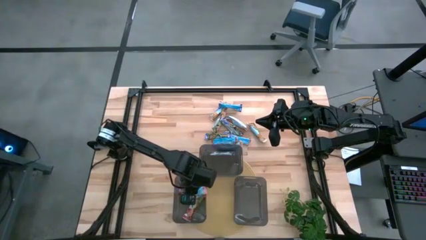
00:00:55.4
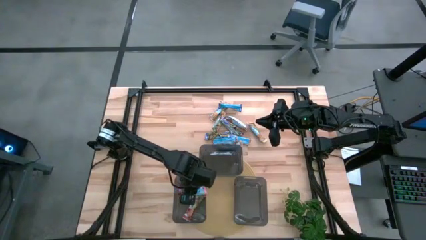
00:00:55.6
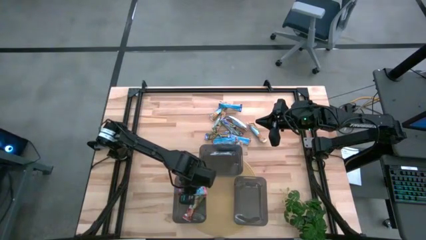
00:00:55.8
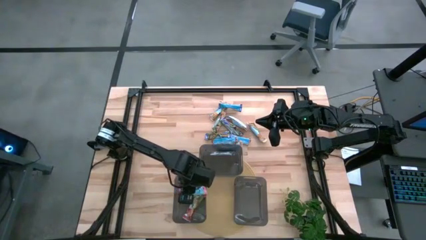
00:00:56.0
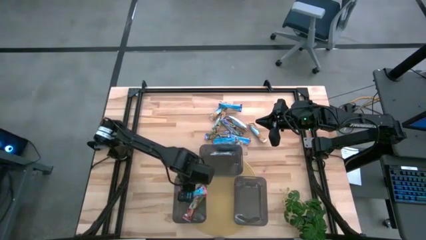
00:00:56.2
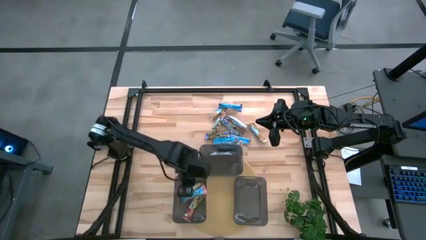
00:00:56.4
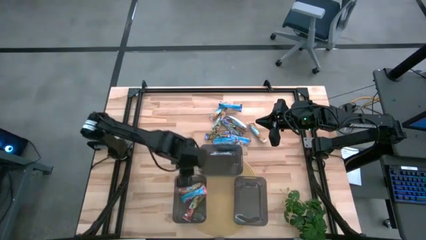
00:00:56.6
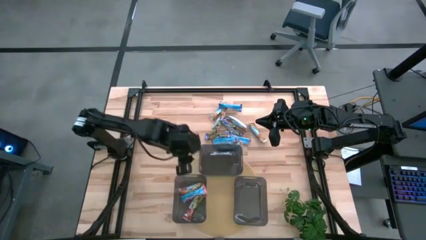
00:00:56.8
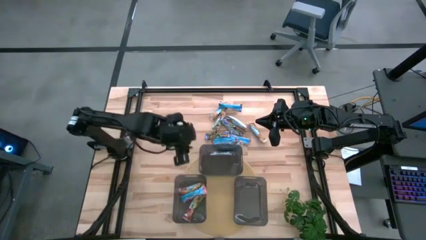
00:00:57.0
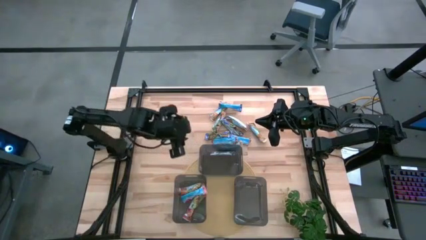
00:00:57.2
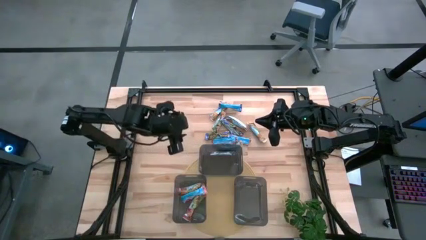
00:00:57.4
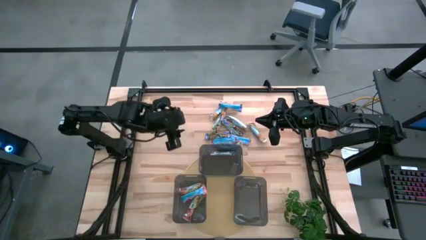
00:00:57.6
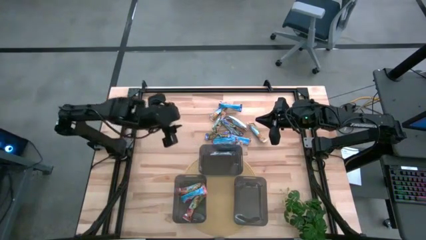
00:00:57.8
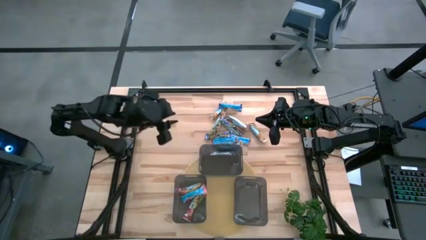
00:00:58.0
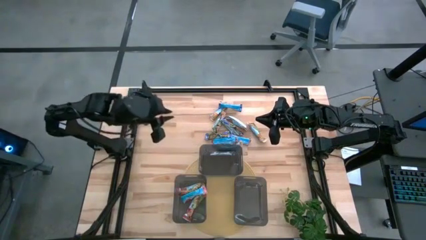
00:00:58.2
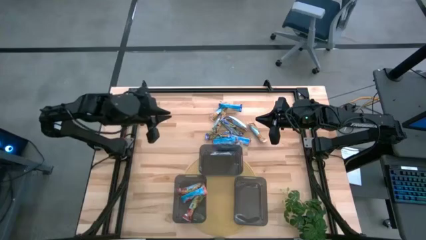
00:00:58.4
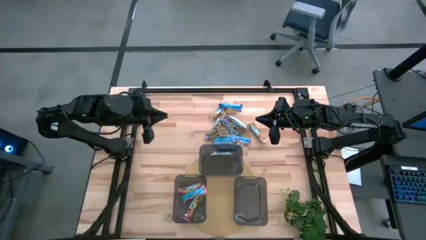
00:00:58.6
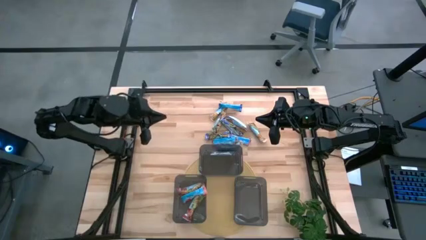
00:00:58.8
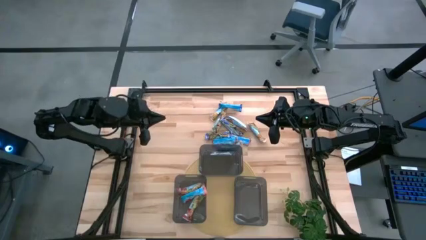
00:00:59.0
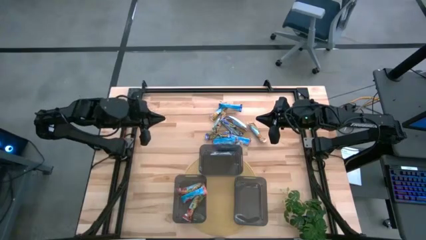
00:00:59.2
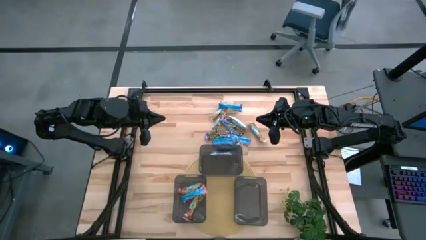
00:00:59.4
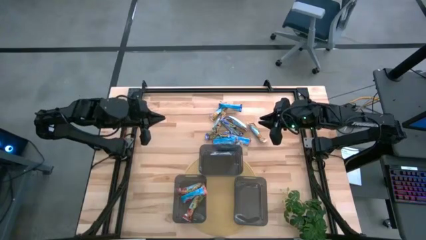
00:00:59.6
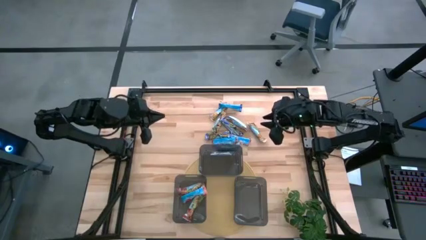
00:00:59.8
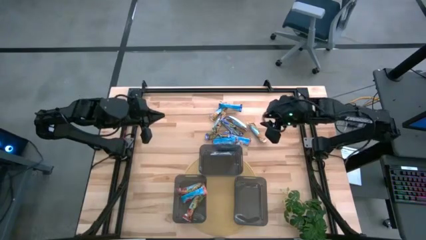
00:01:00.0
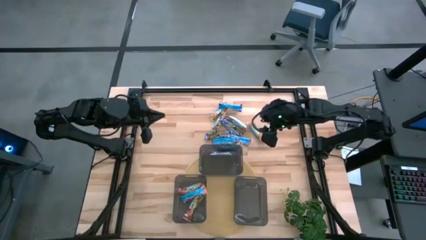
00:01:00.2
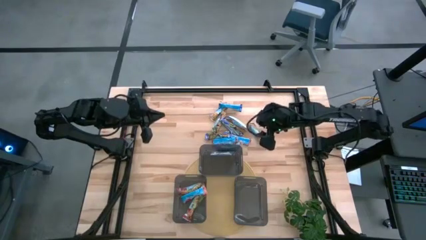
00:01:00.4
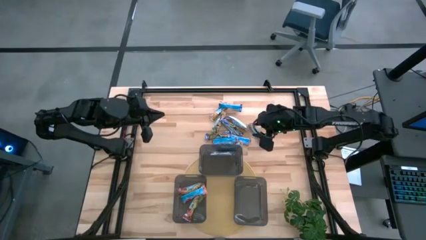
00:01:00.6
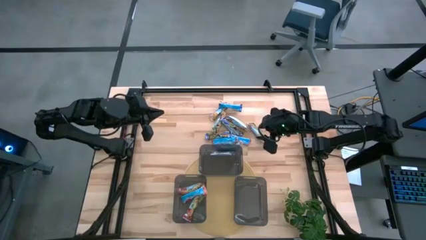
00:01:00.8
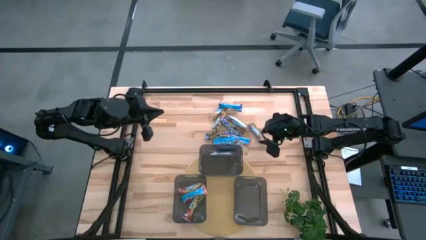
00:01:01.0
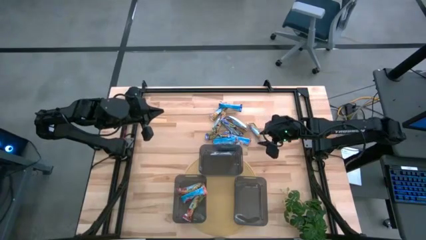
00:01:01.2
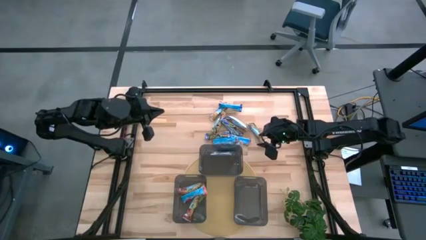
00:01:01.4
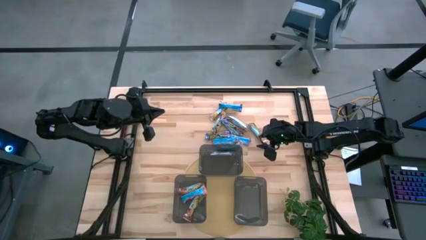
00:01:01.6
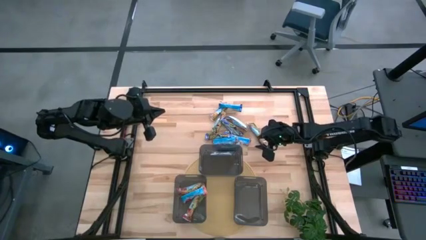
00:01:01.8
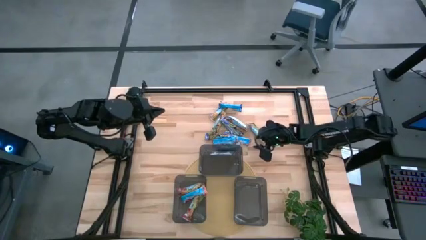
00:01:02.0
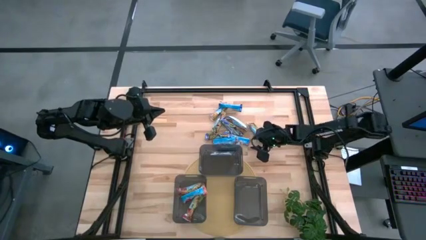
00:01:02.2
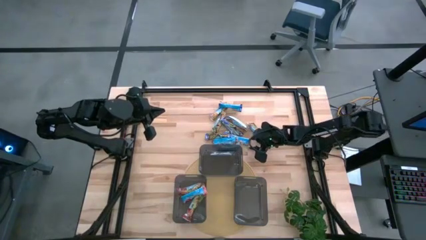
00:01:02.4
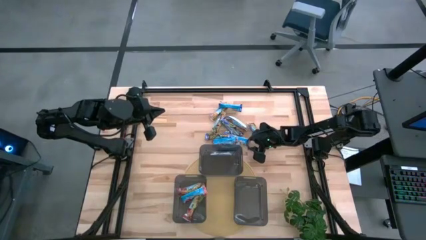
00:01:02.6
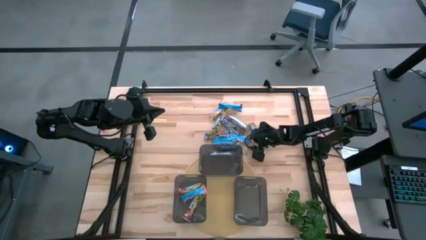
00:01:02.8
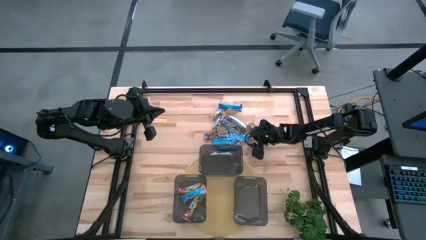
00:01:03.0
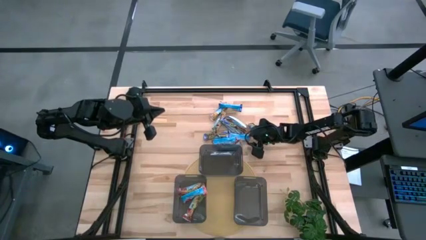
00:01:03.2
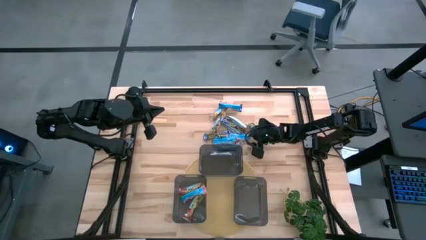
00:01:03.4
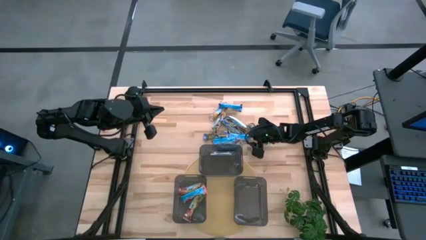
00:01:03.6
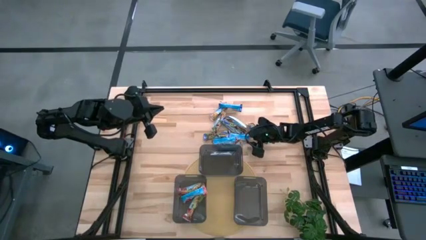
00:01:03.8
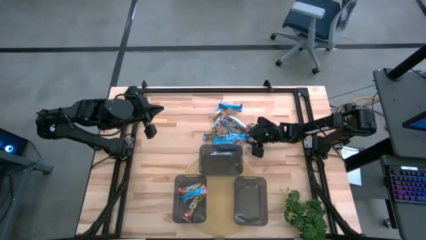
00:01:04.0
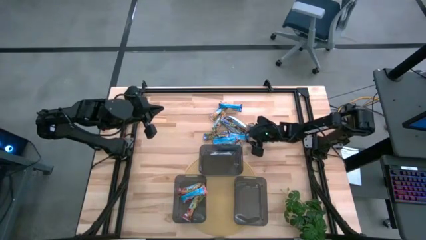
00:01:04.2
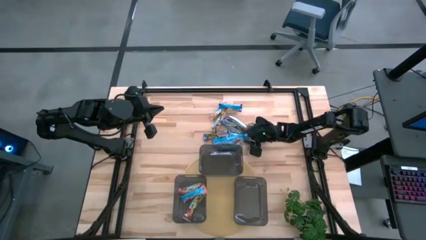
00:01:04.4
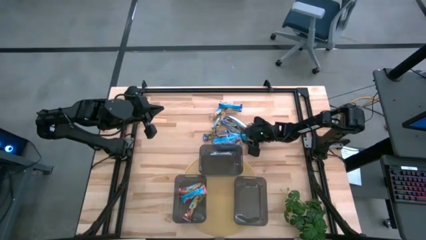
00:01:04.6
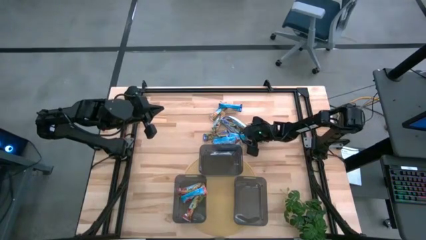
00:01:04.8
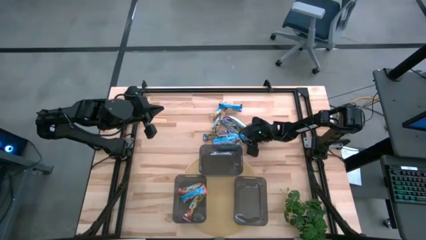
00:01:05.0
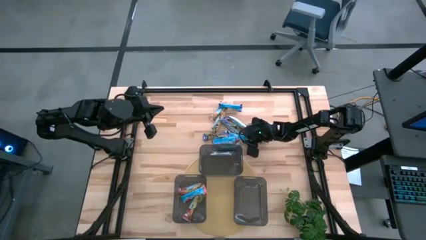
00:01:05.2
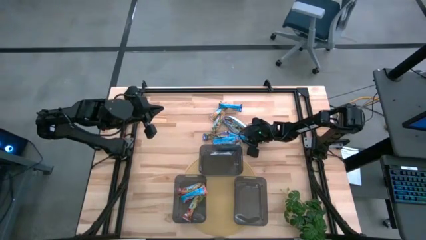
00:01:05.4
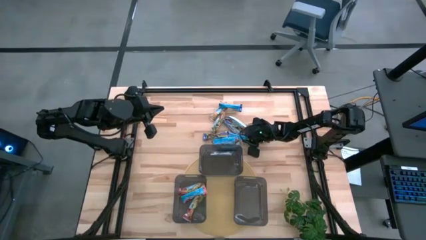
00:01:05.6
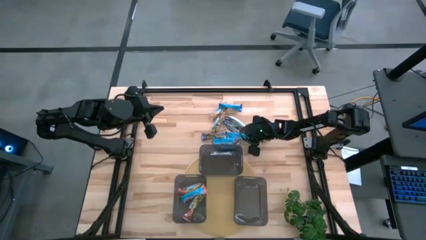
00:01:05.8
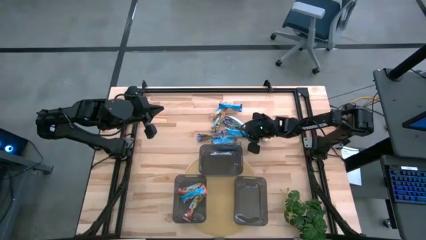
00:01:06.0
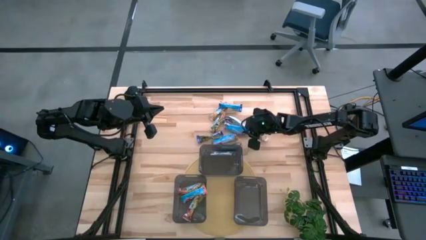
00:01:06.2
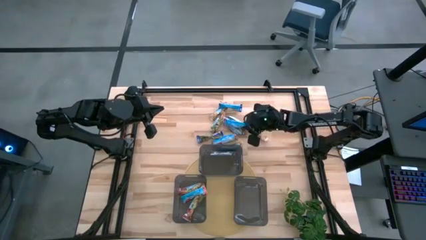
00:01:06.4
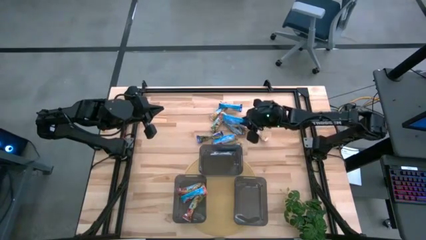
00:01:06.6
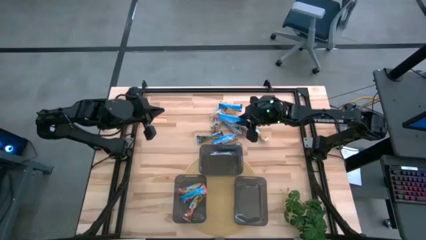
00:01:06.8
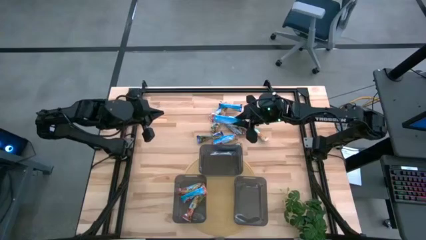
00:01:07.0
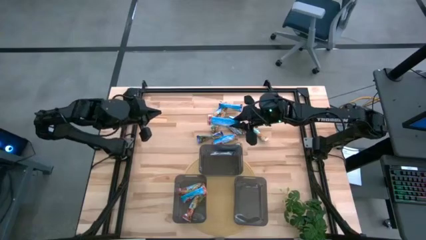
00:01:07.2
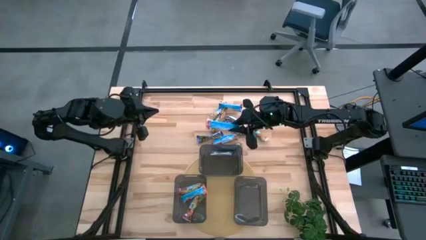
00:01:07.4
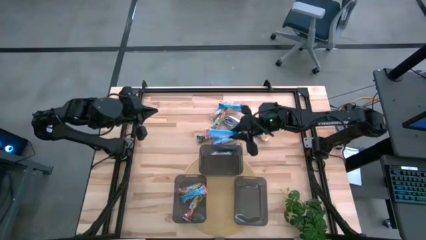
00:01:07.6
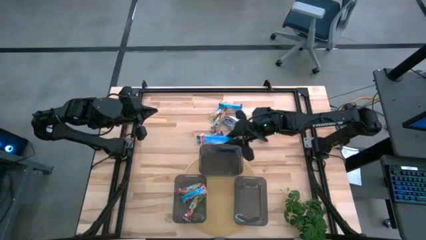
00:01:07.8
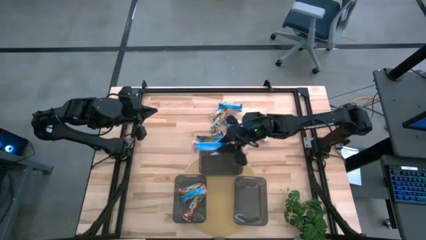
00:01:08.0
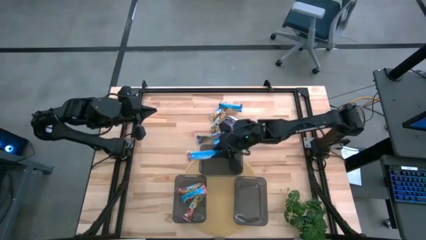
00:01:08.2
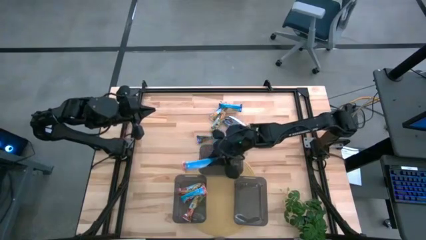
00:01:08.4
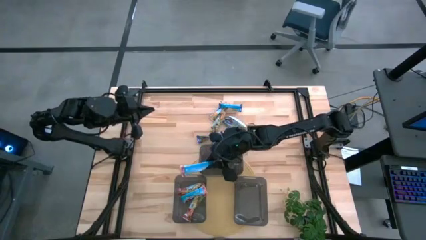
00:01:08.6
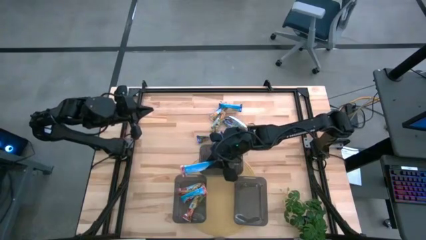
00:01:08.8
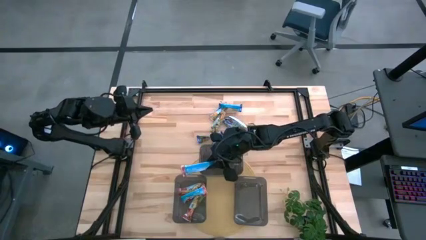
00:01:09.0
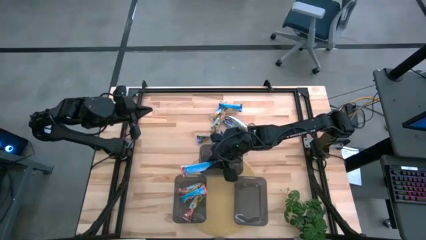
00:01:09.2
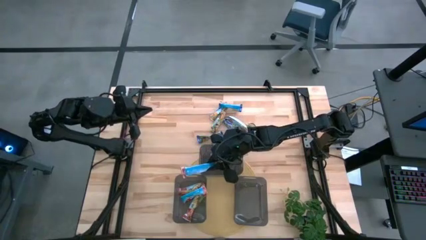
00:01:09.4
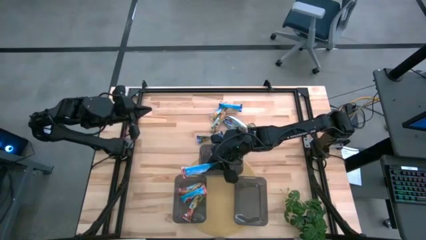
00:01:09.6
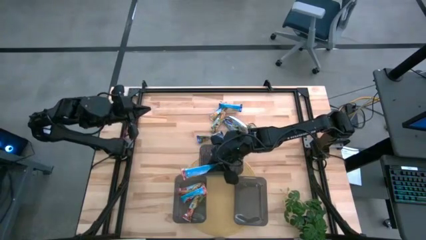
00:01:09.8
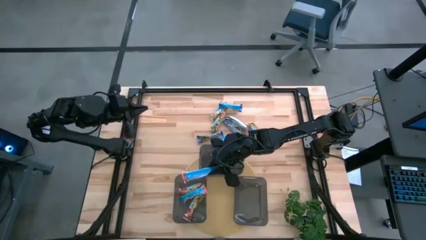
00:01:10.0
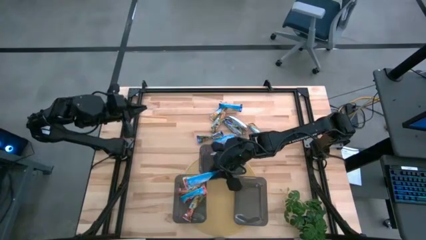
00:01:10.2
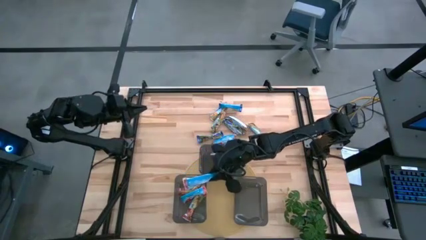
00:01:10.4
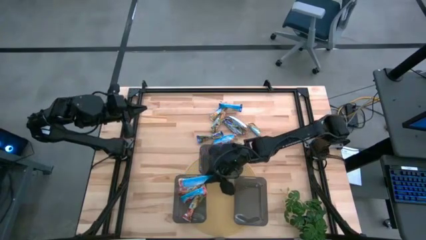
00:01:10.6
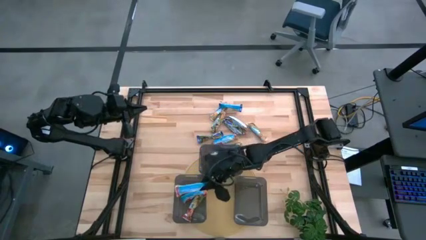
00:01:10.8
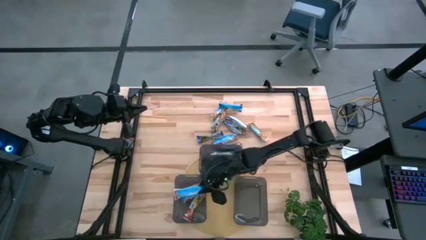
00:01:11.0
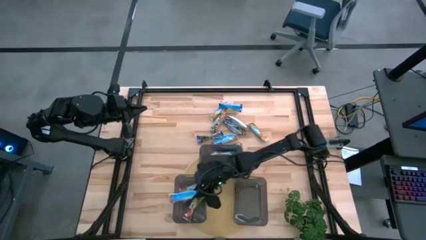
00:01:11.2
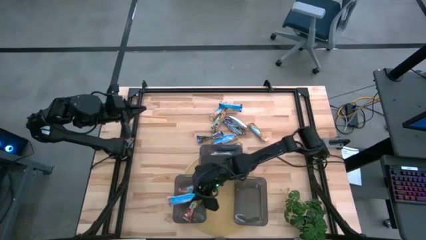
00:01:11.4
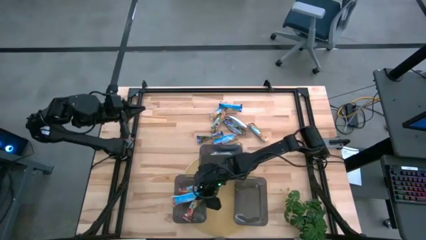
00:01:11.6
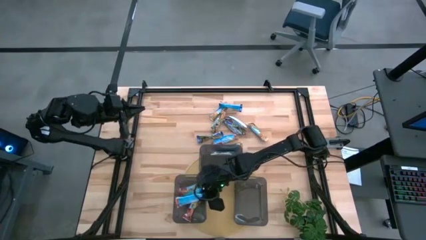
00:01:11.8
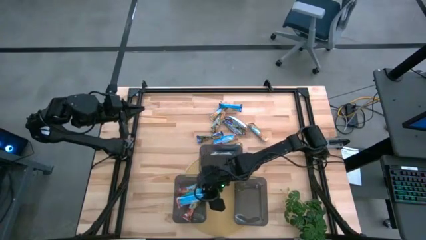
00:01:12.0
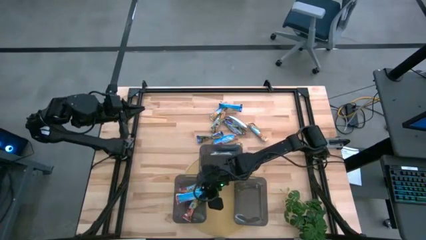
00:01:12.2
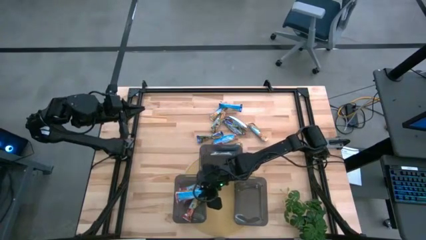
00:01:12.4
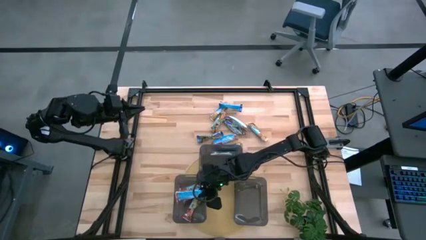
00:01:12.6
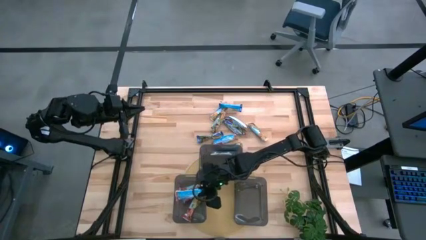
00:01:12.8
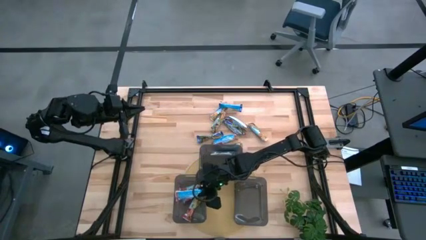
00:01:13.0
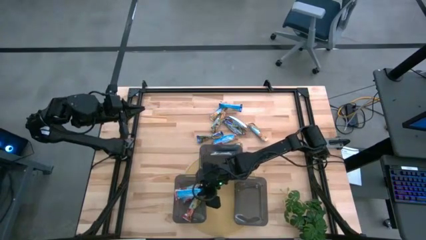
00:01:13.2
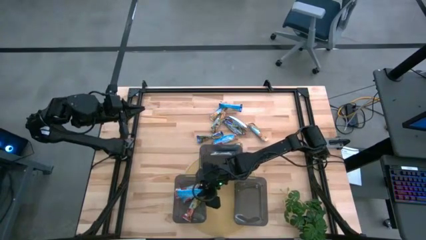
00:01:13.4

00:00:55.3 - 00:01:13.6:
Task: Pick and place Granola Bars by type
Put the right red granola bar into the bottom left black bin
